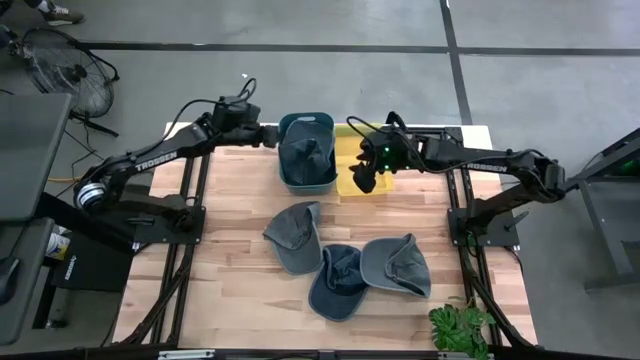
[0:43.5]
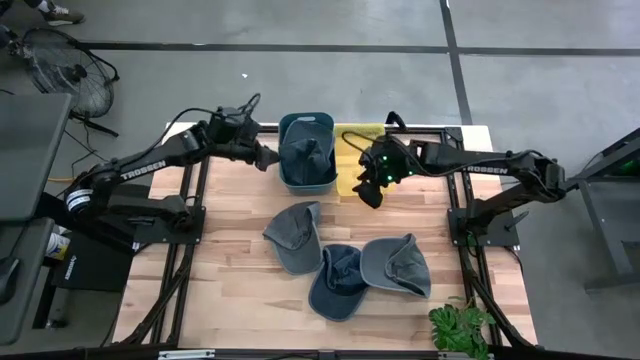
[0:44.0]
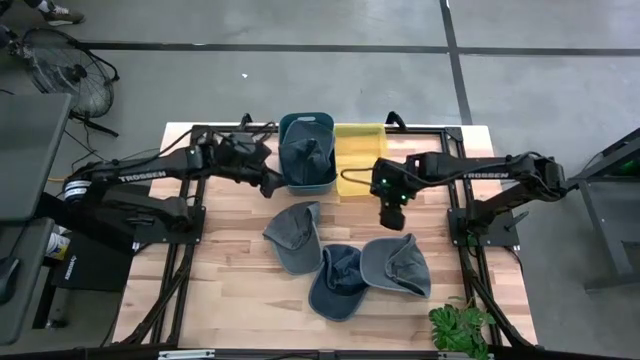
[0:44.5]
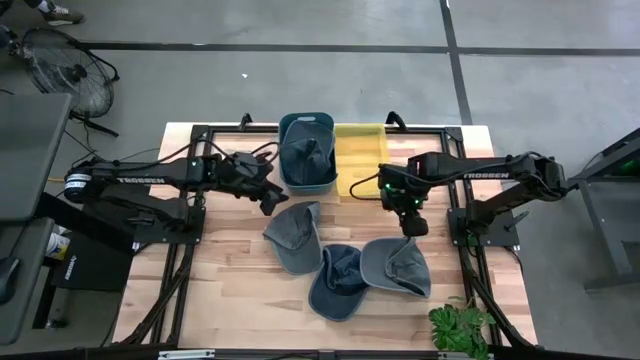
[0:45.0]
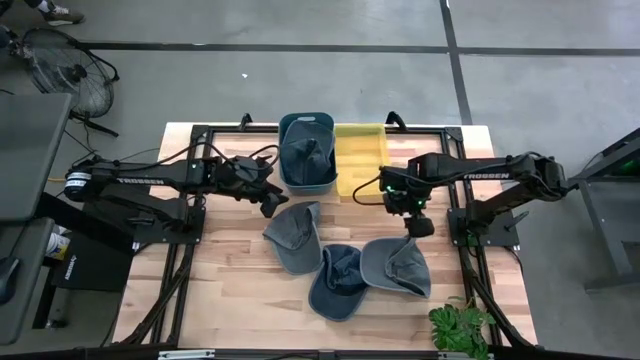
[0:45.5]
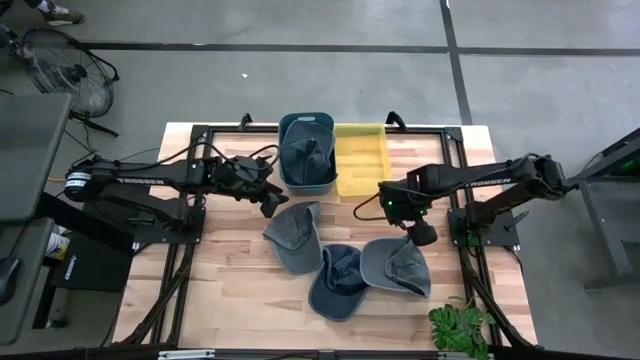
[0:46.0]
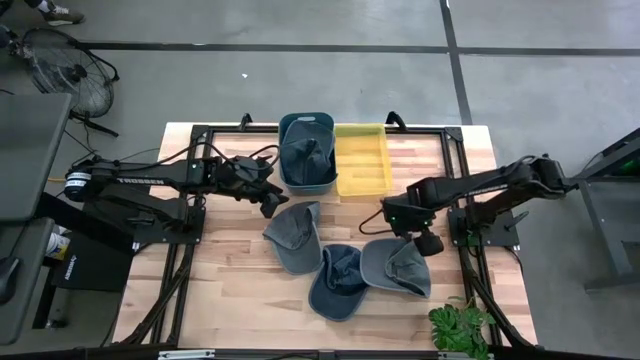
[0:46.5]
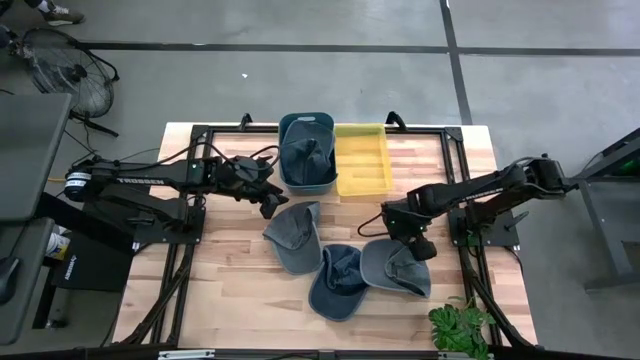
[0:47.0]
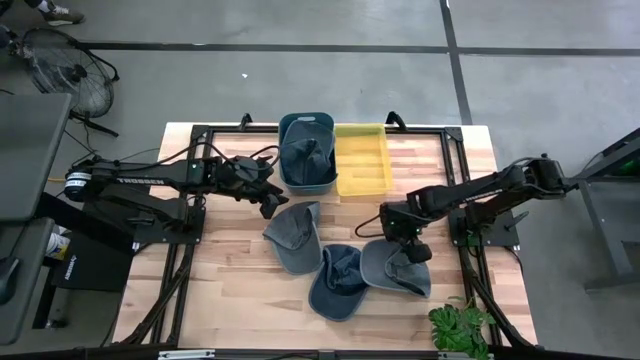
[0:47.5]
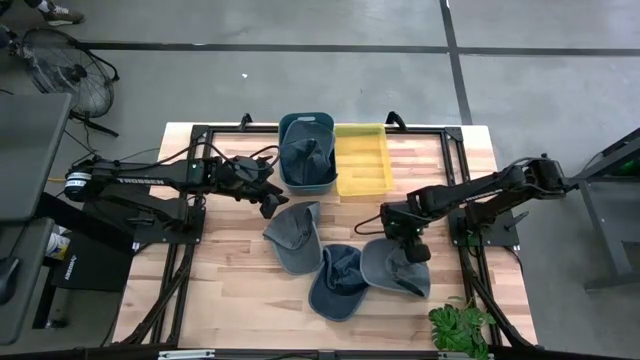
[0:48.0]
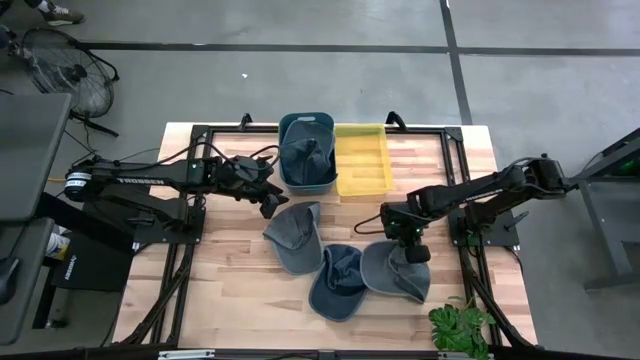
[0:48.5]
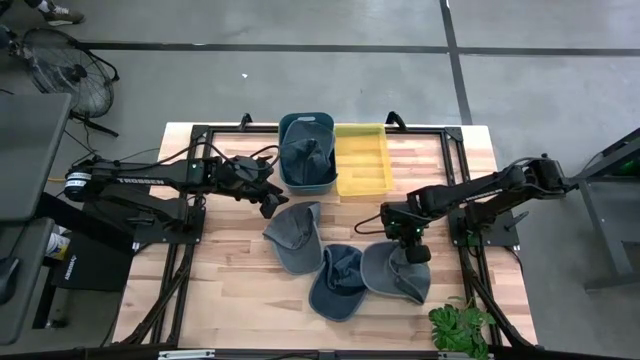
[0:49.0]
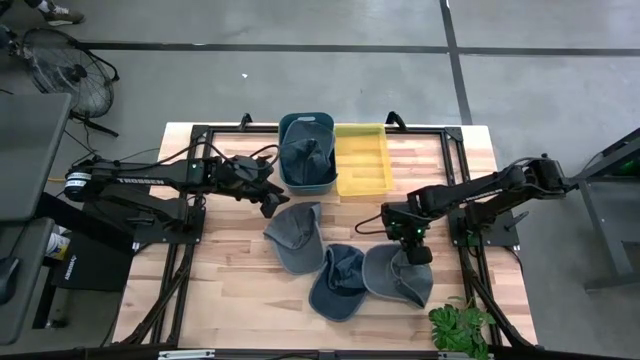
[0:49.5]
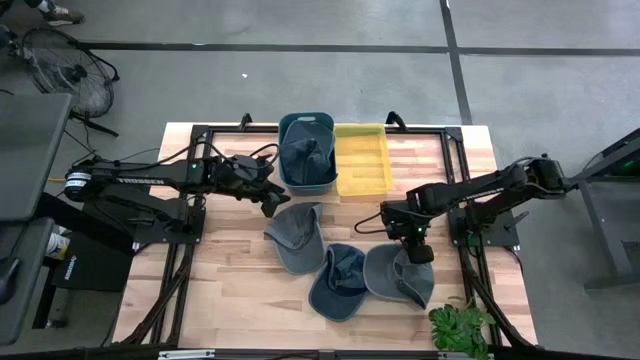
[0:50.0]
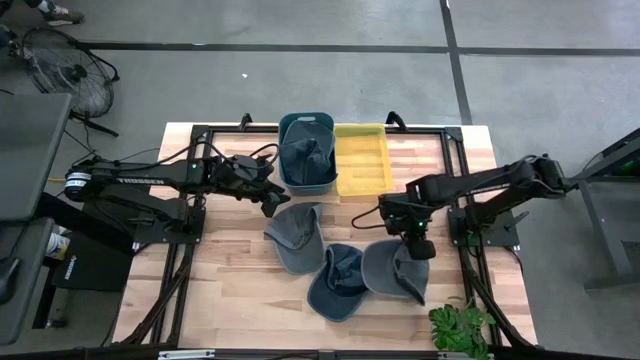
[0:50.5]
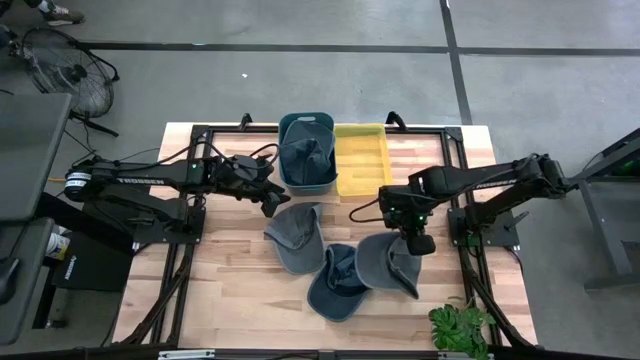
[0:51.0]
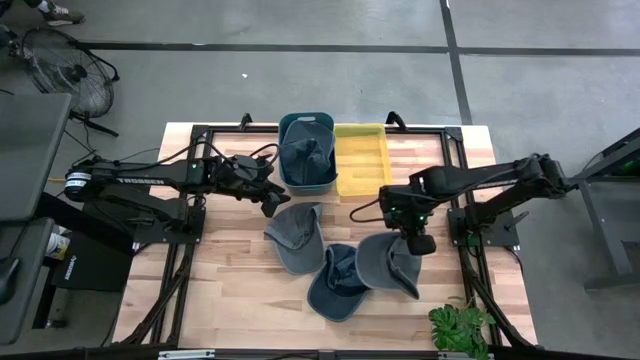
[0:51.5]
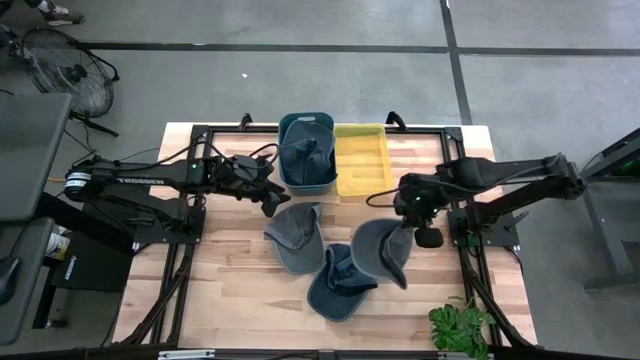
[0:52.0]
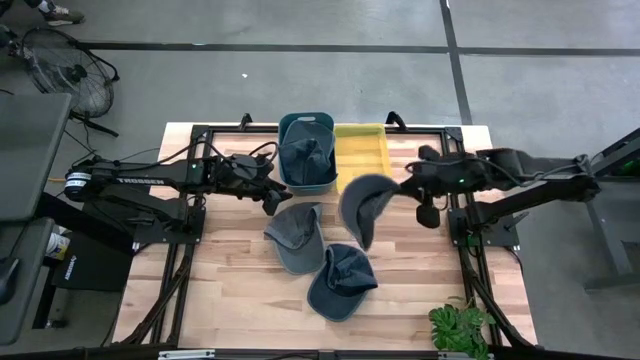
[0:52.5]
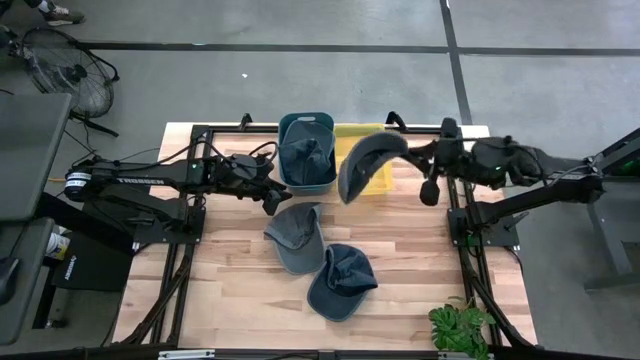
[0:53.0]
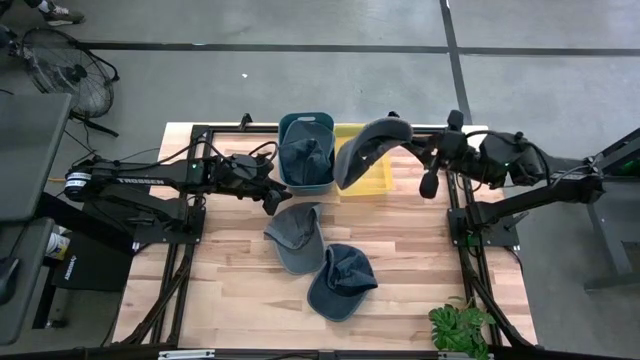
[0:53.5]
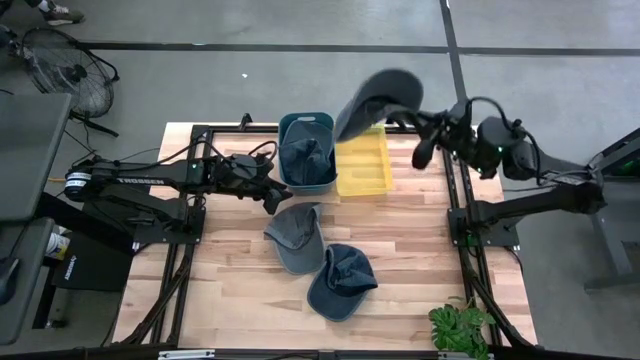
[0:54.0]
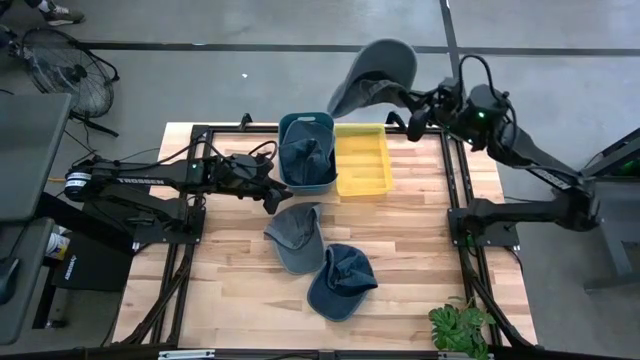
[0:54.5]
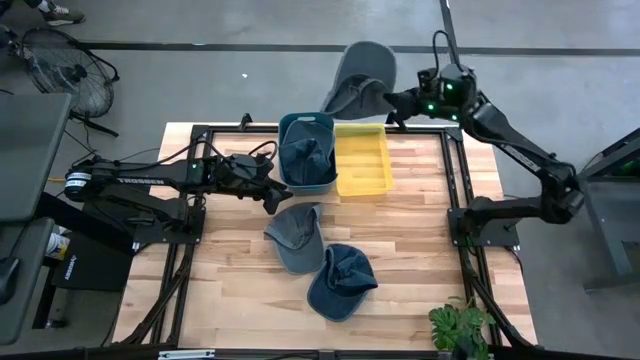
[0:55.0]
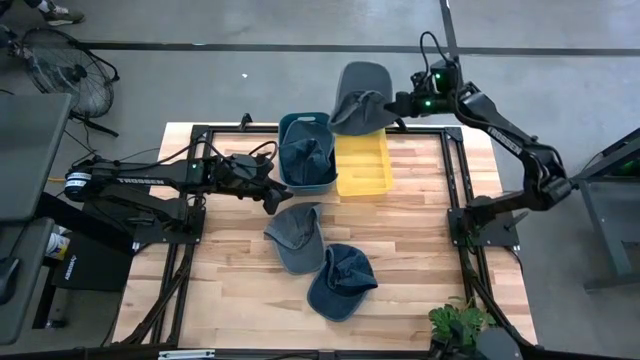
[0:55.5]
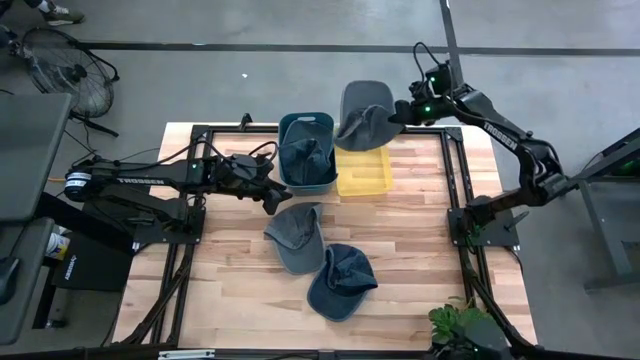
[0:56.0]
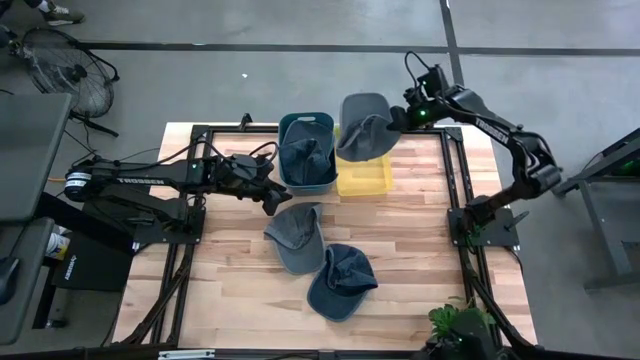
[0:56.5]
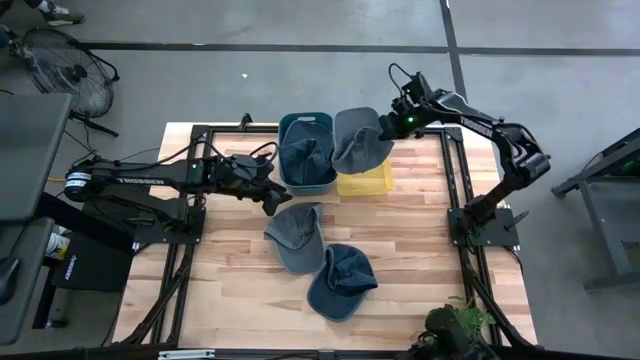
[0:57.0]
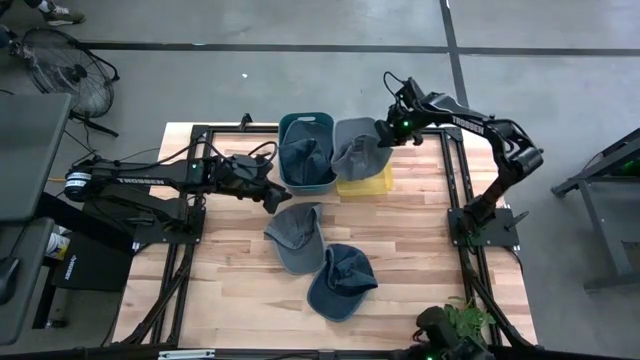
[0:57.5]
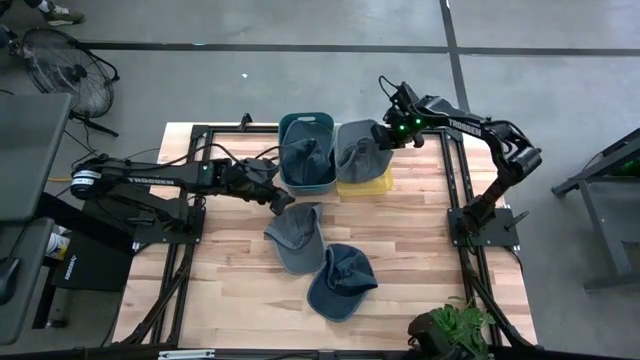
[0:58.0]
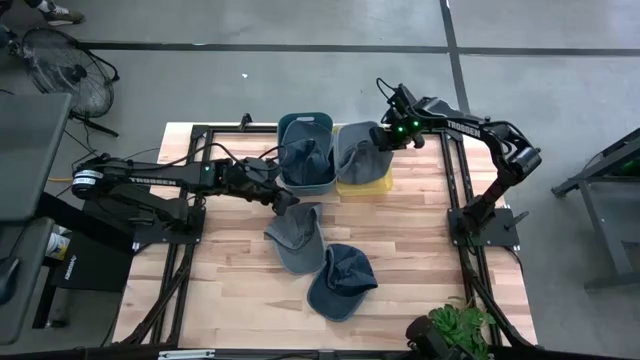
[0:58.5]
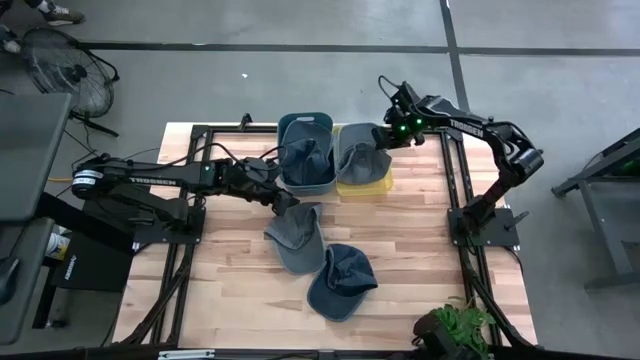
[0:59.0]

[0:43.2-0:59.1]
Task: Pick & Place hat
Put the right gray cap into the yellow bin
